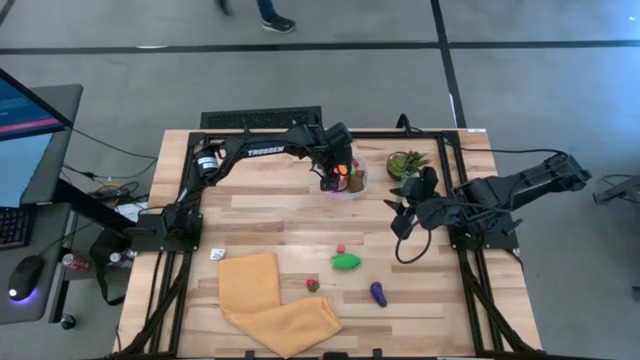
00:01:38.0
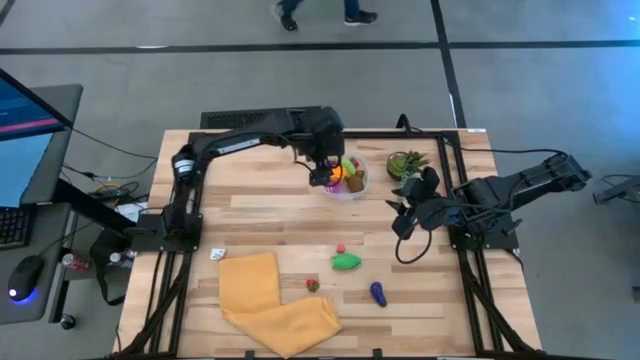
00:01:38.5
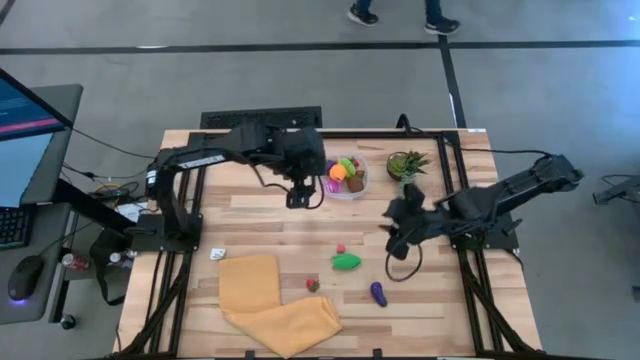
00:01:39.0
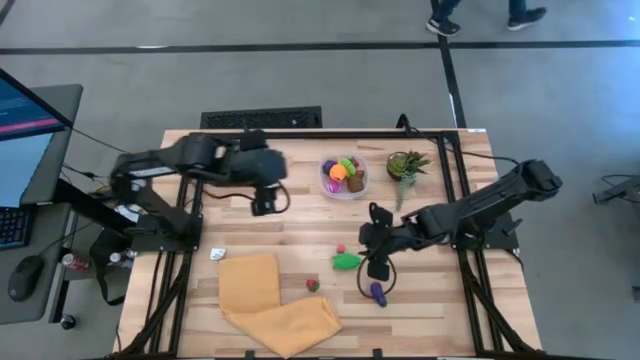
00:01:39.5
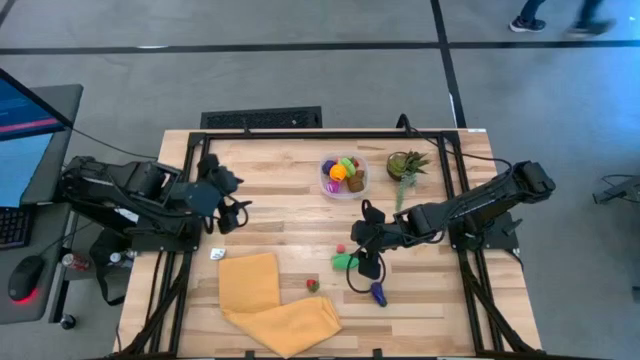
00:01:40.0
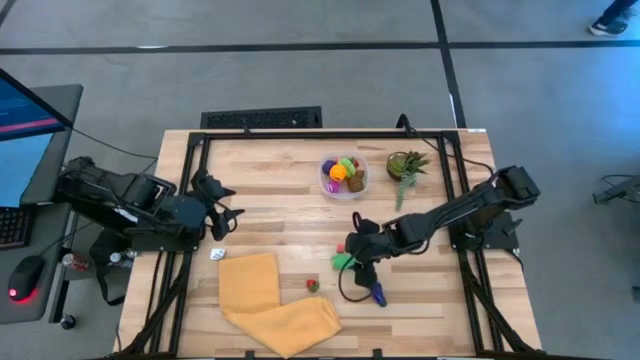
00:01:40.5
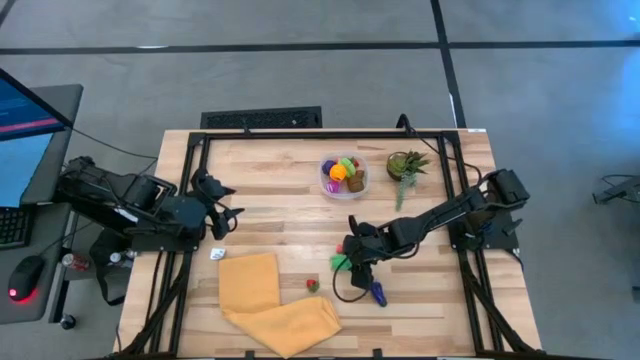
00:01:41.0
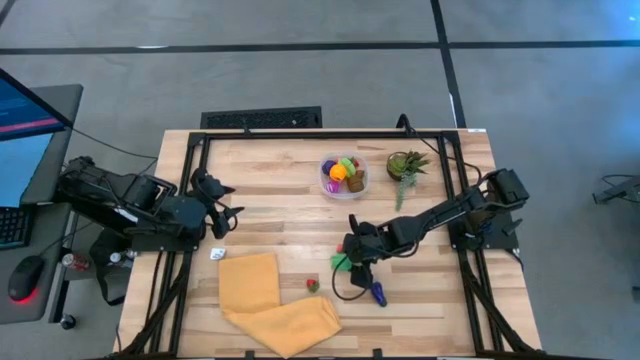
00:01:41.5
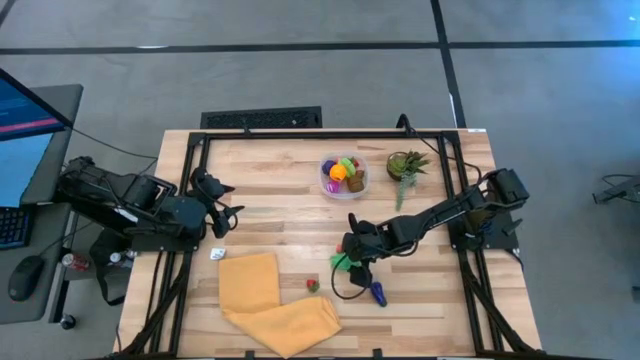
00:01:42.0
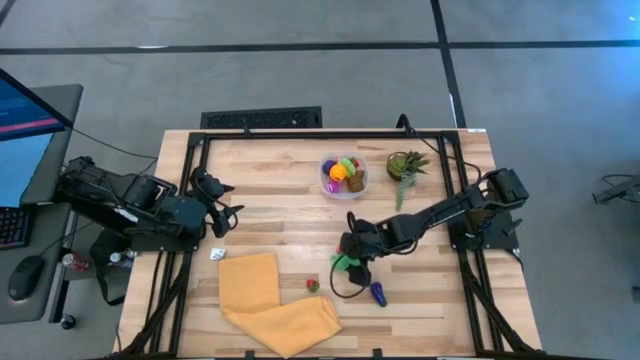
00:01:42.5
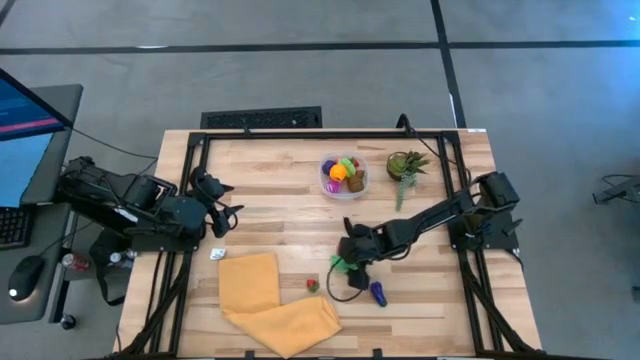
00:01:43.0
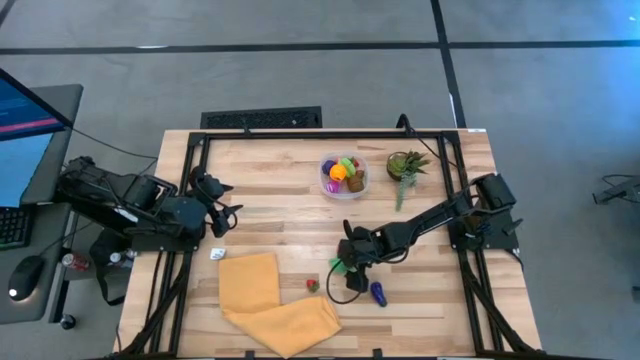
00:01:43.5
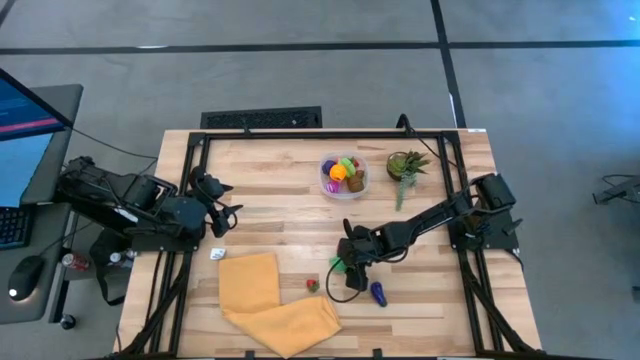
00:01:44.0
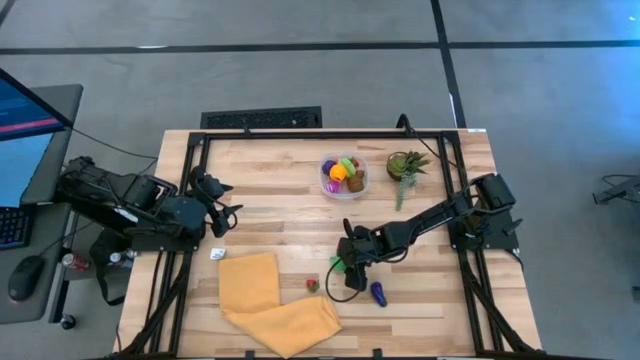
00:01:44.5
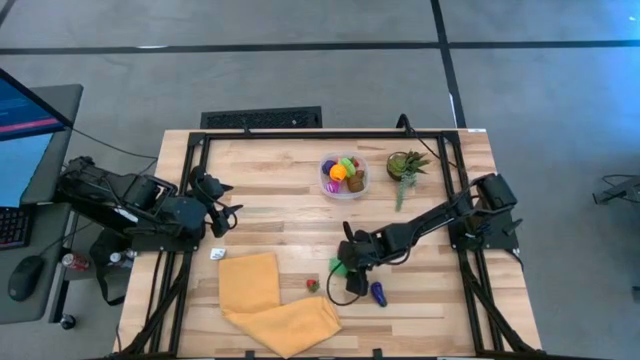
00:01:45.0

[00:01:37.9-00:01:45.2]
Task: Pick and placing Produce into tupperware
Put the corn in the transparent bin

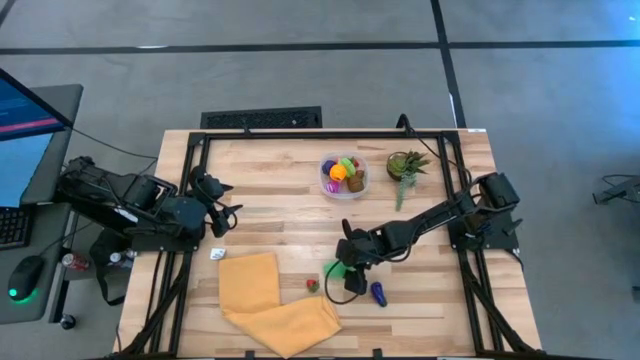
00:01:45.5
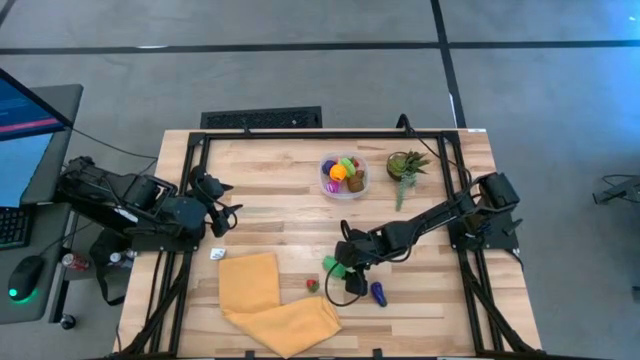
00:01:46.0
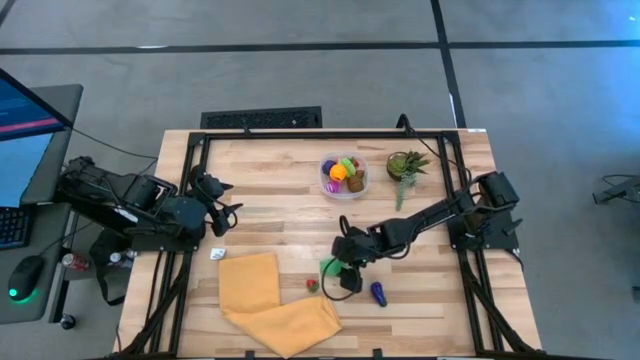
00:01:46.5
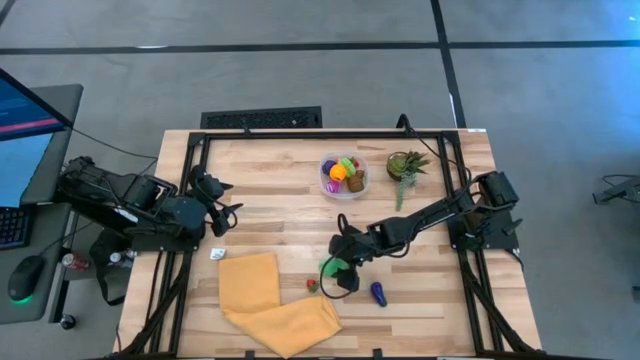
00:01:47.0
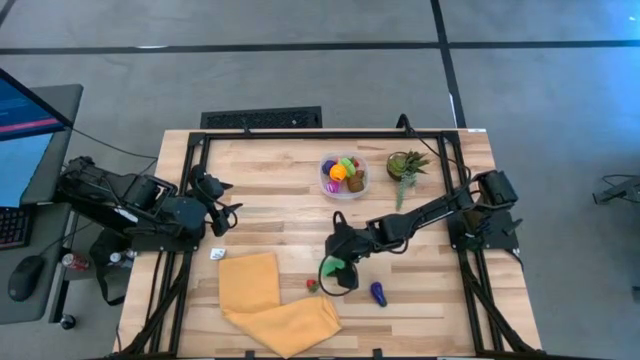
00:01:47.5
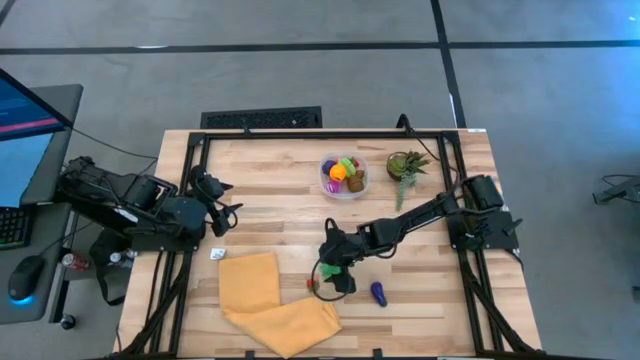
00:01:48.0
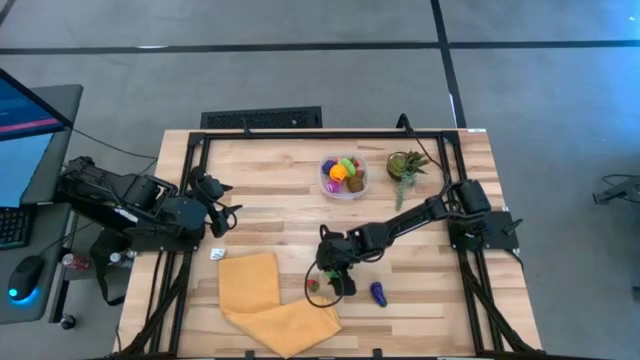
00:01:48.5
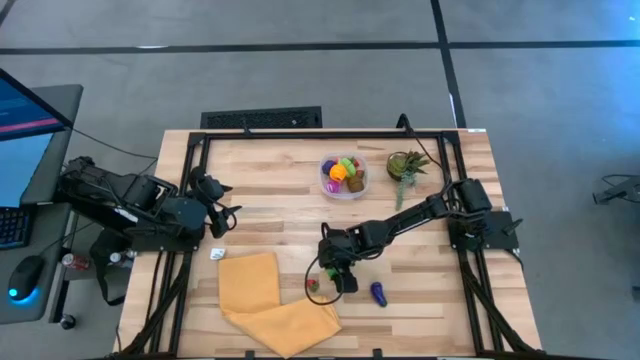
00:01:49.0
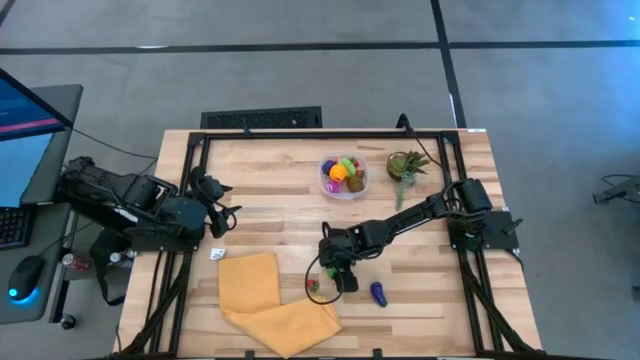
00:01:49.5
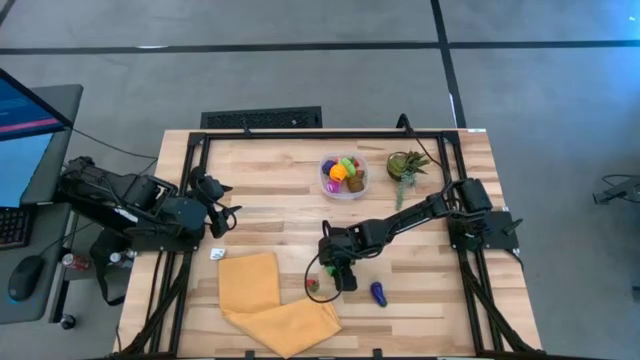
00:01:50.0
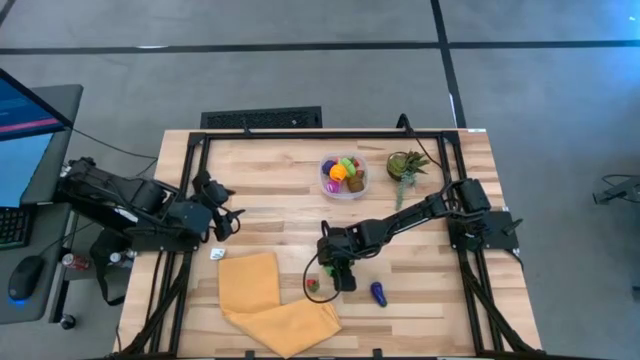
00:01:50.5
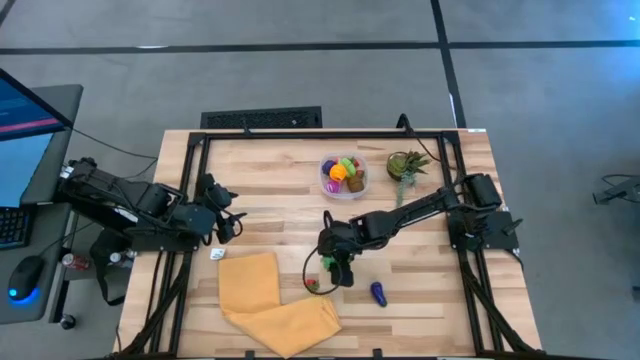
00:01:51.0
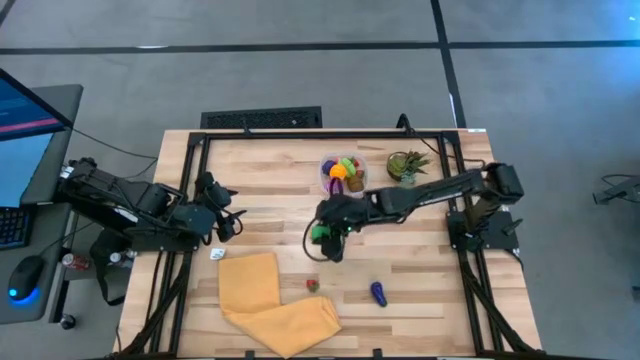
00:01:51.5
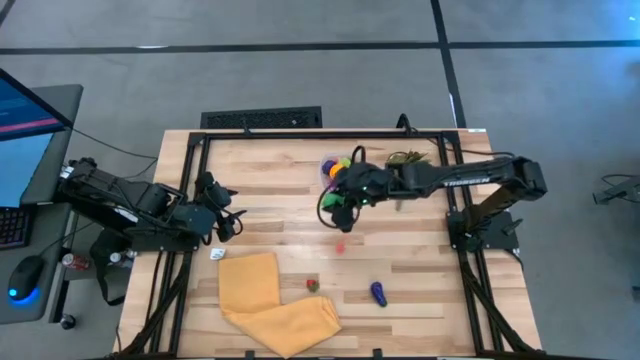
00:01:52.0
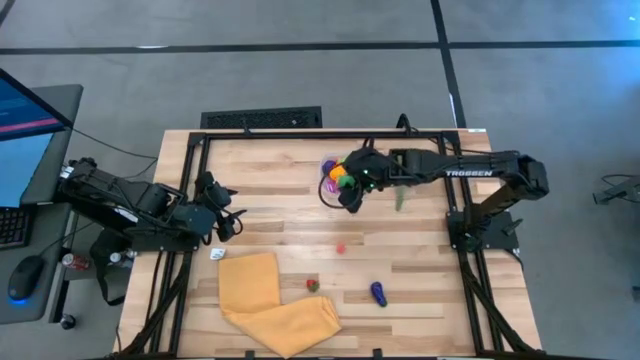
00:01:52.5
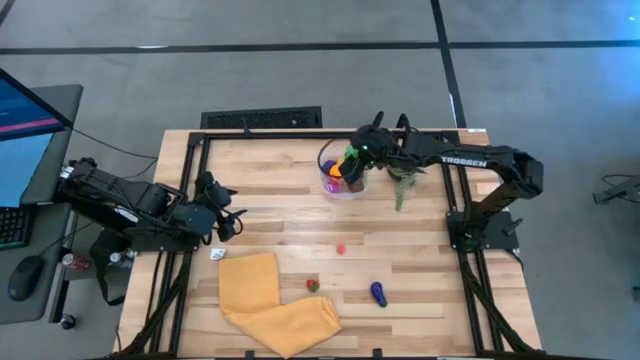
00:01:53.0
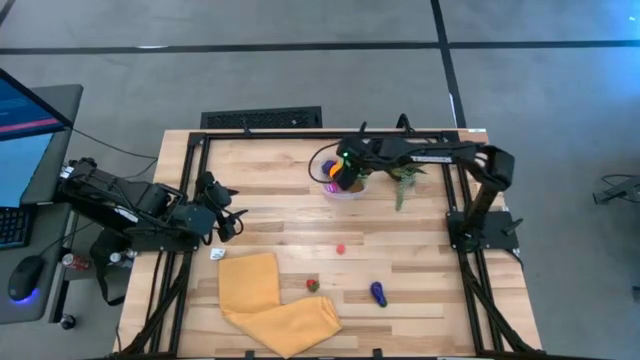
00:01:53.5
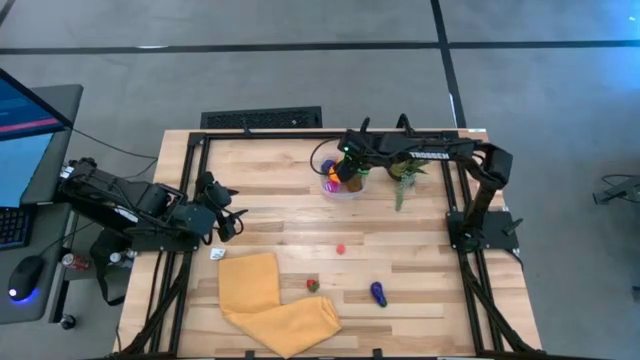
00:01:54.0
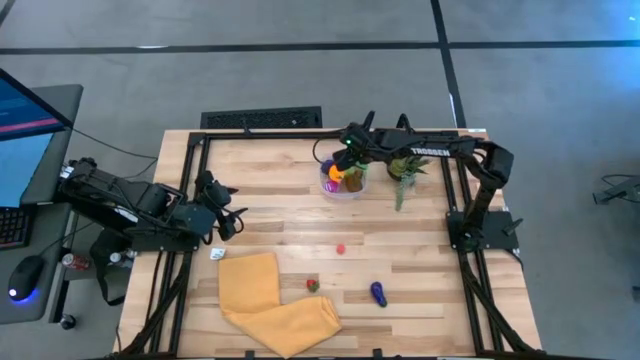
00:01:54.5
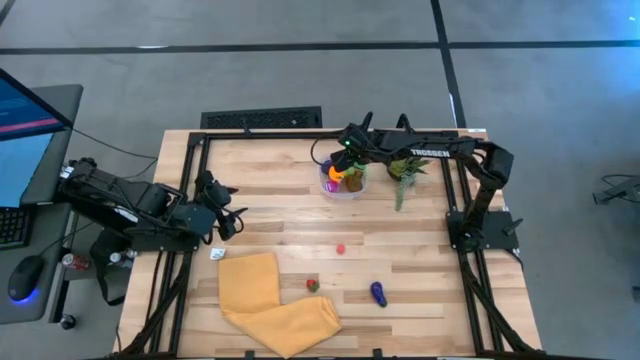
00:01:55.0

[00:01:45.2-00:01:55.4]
Put the corn in the transparent bin

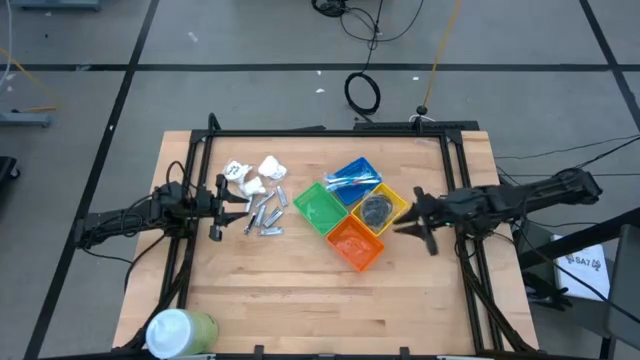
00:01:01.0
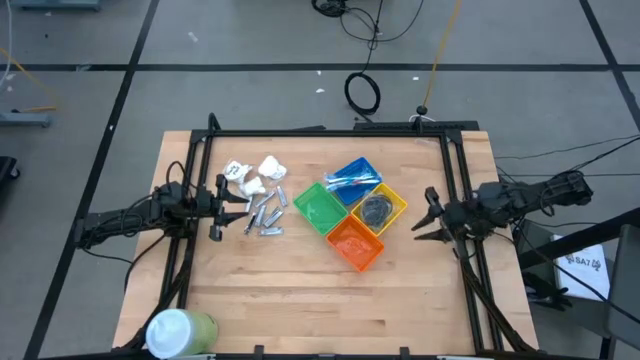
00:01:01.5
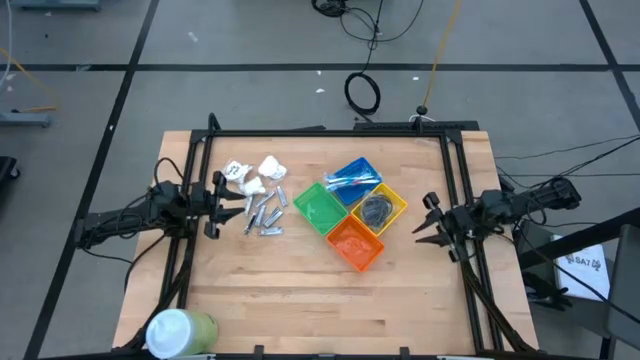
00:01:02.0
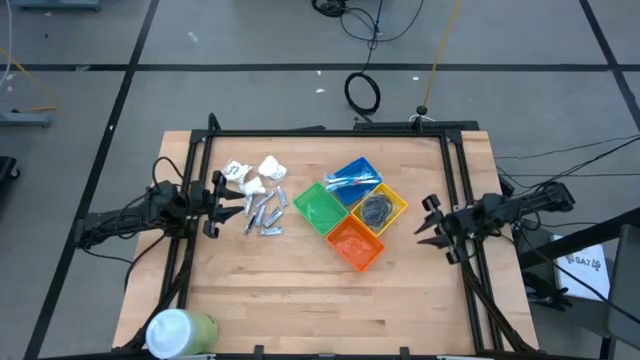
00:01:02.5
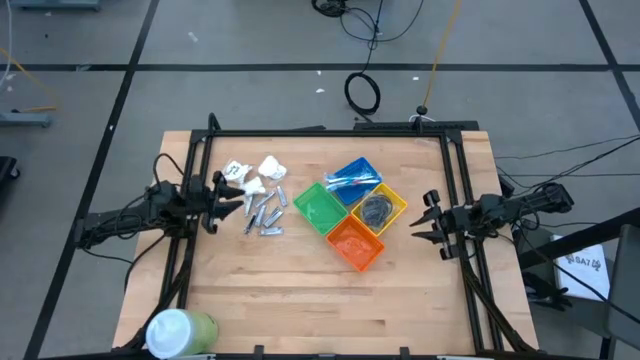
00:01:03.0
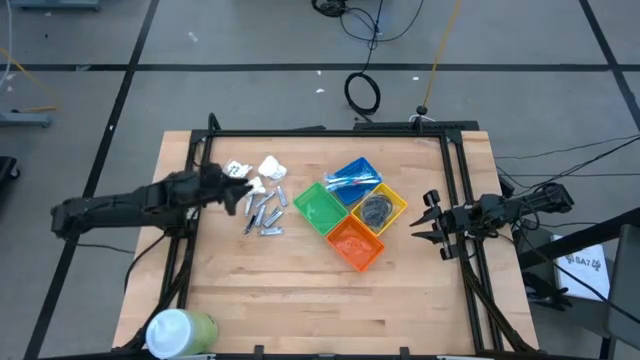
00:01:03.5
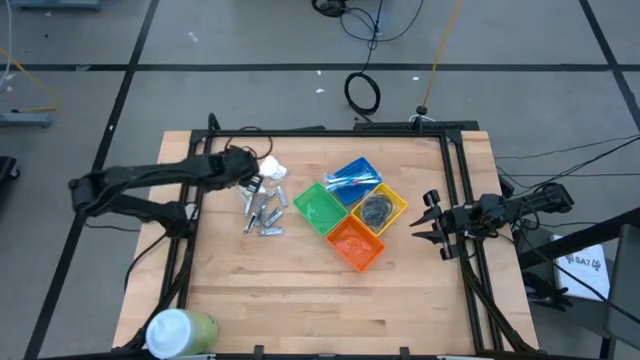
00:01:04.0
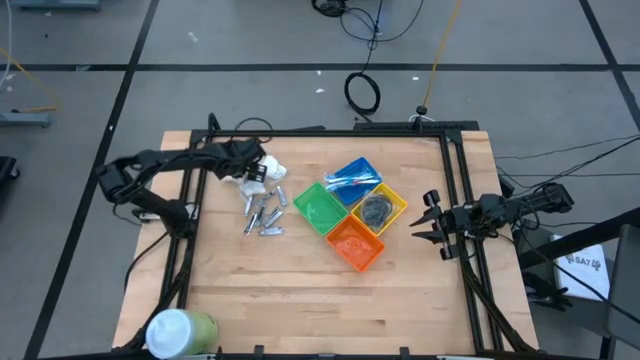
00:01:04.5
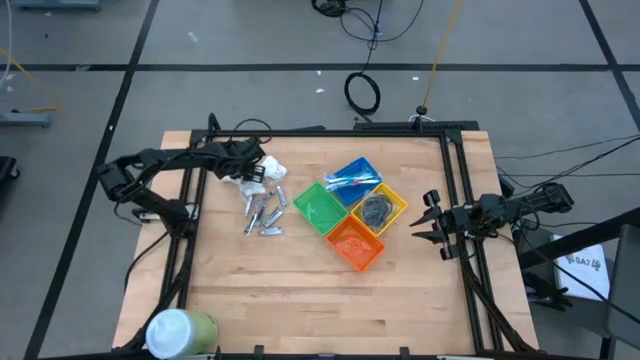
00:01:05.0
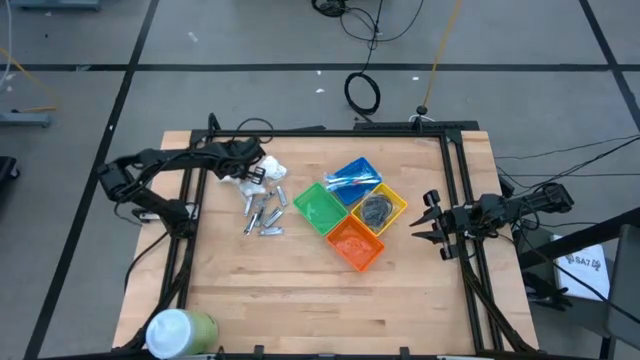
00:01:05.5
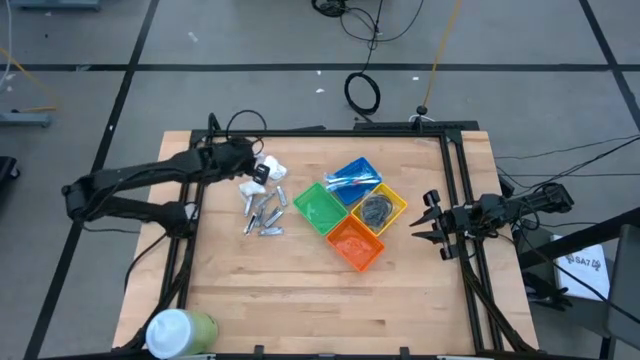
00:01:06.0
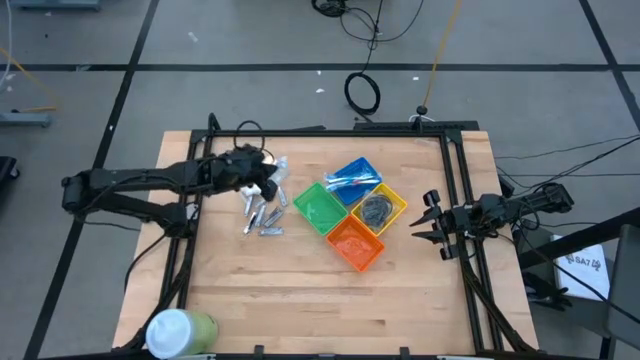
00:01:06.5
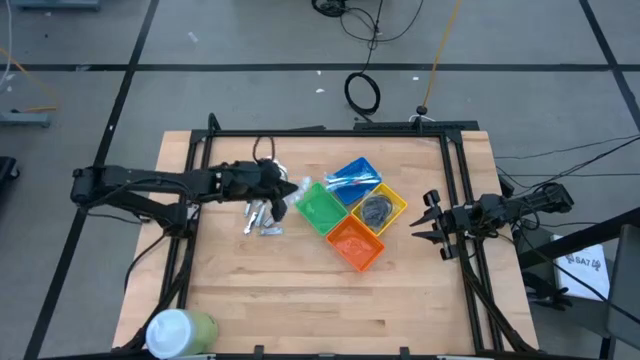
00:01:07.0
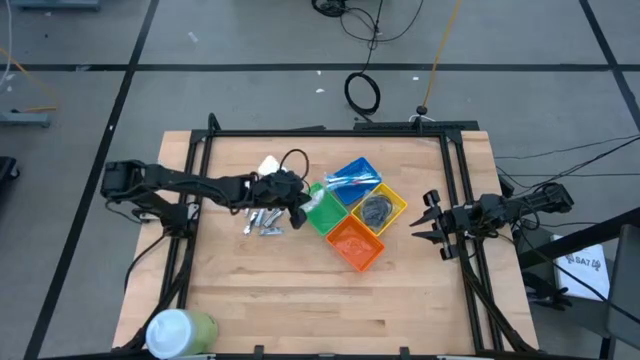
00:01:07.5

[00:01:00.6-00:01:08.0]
Task: Pick & Place Travel size toiletries
Put the white cotton pack into the green bin
